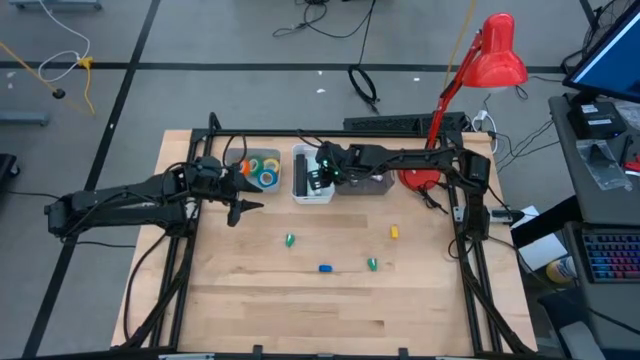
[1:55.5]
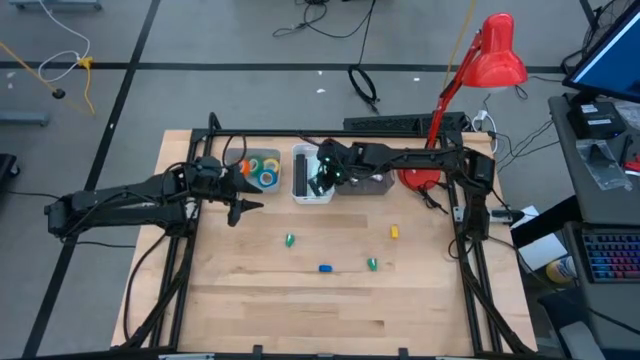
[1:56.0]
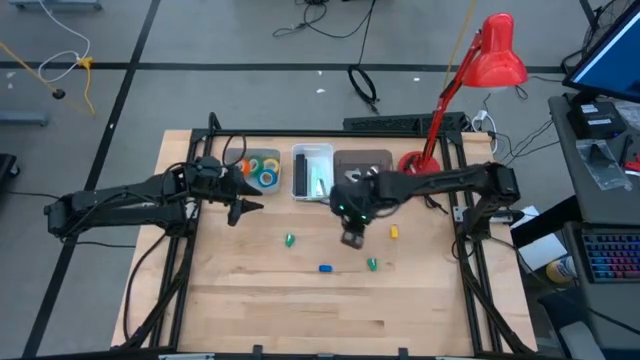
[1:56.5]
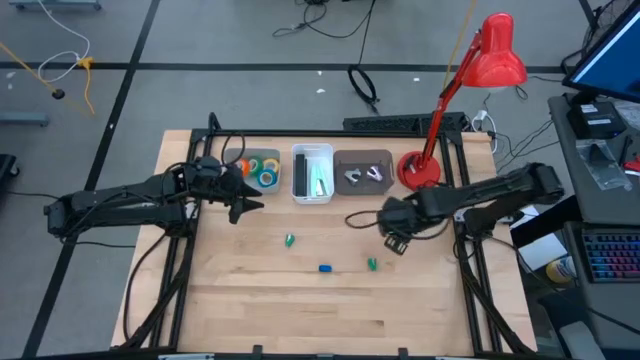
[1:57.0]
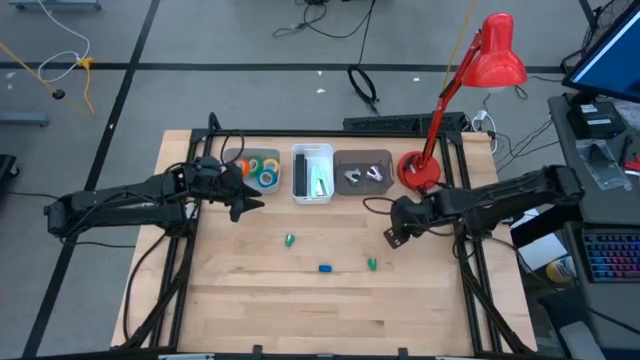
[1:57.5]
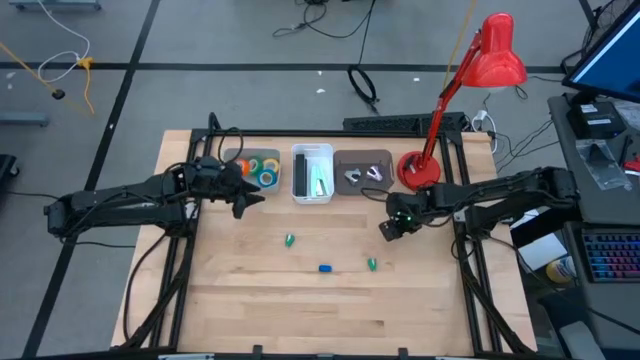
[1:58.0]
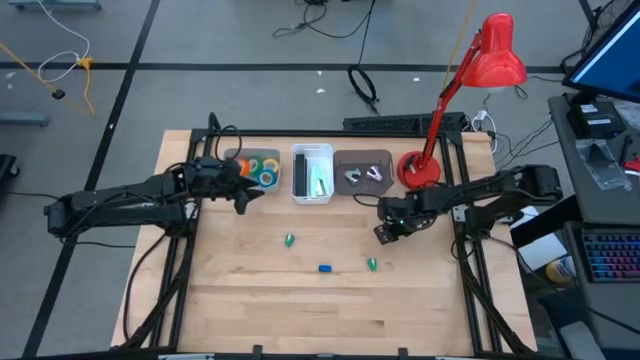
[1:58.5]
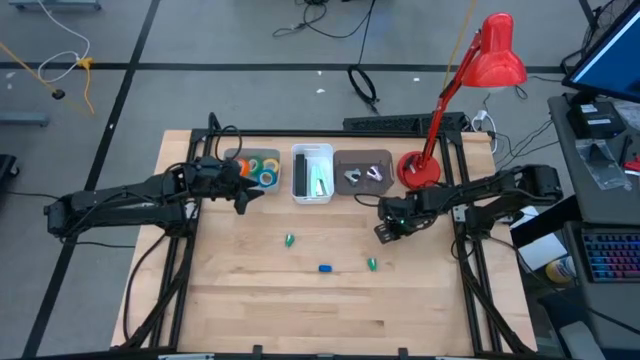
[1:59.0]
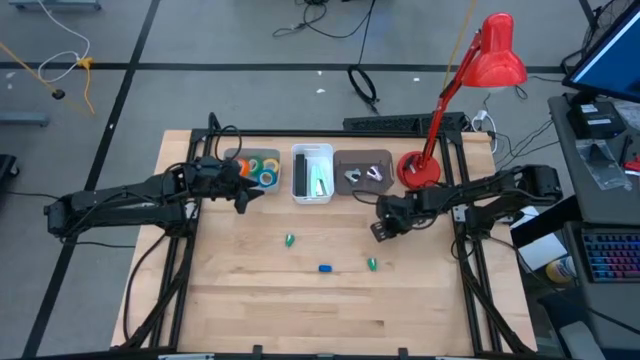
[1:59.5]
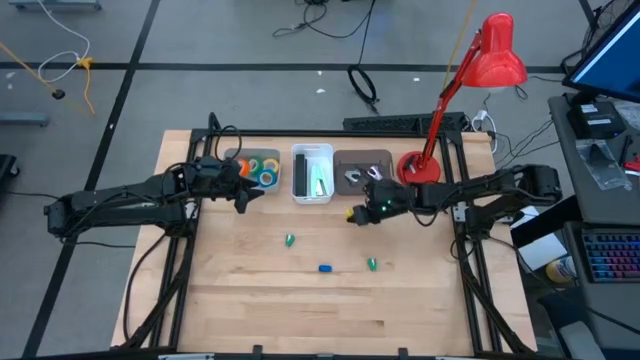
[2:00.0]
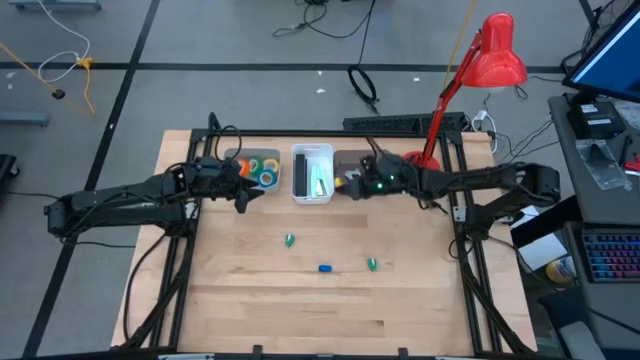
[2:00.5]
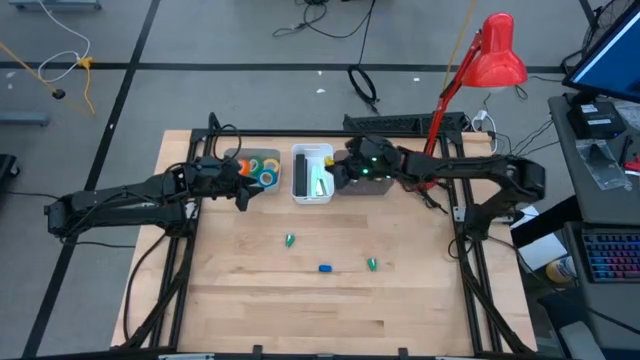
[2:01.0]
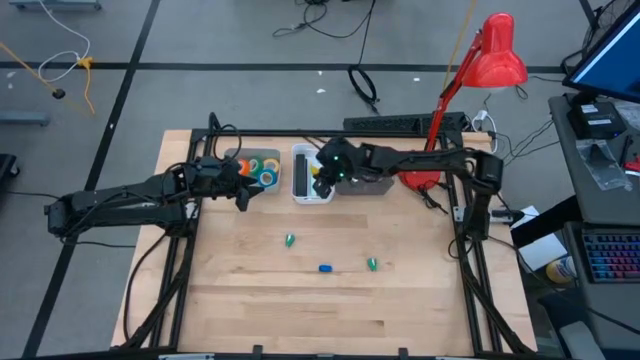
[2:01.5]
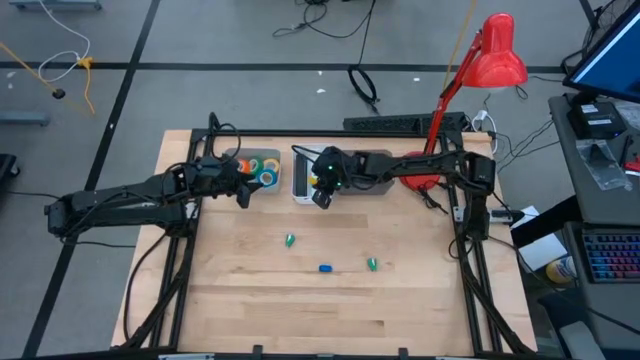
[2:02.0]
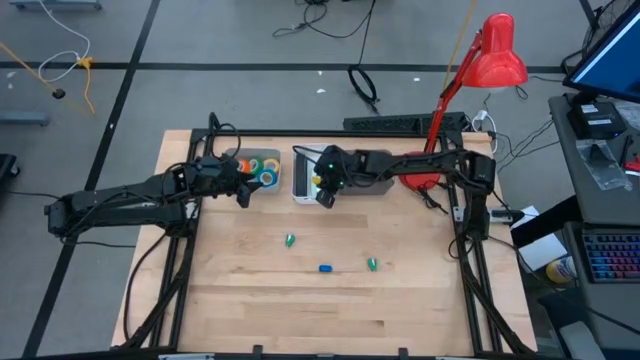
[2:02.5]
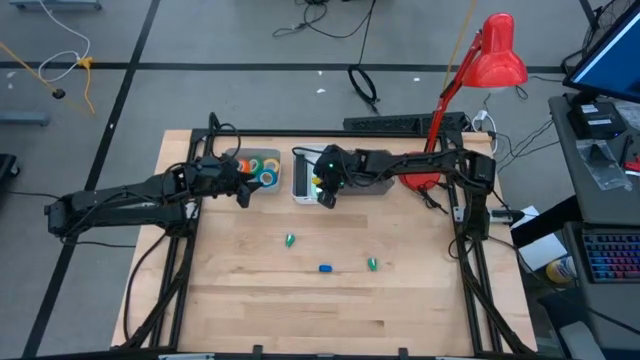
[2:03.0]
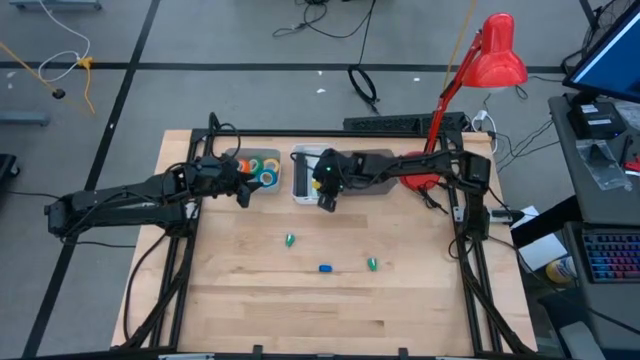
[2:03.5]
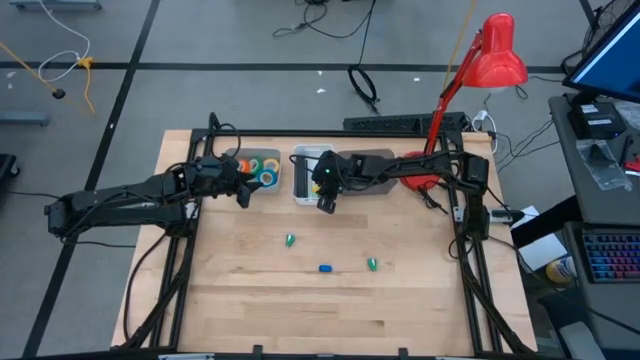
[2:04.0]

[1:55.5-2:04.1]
Task: Pick and place Stapler, Stapler remover, tape
Put the yellow stapler into the white bin

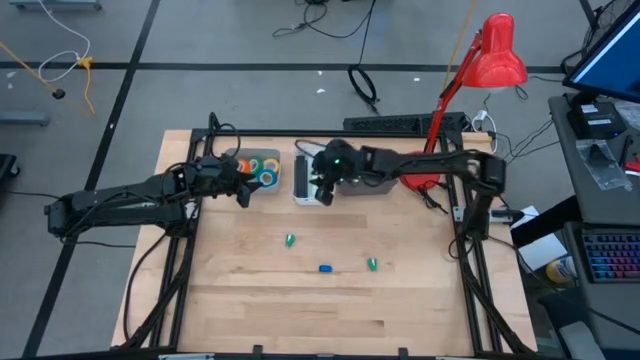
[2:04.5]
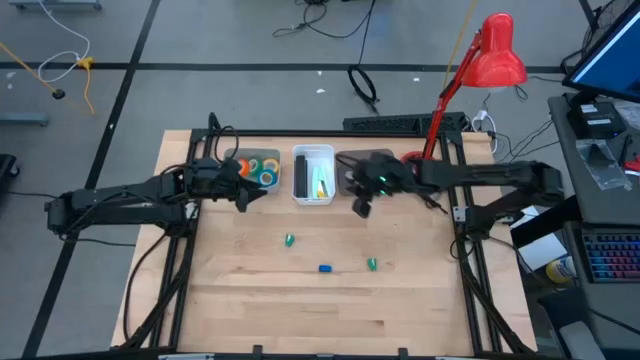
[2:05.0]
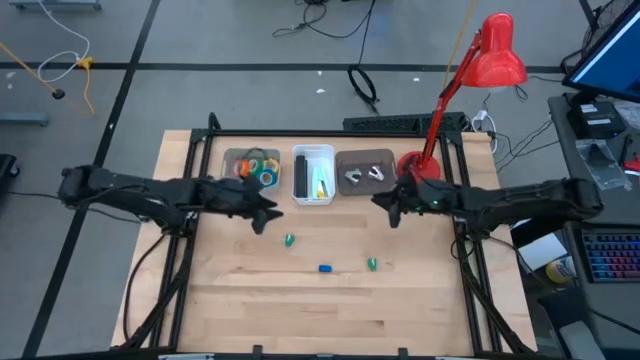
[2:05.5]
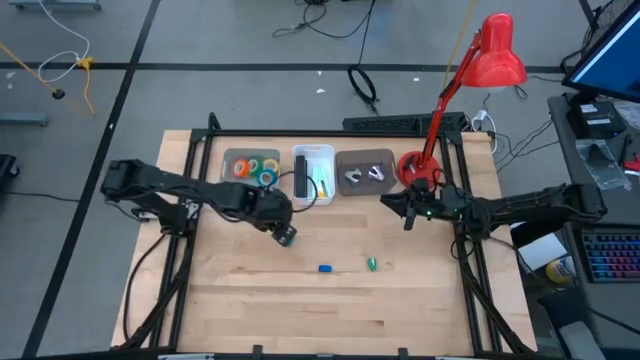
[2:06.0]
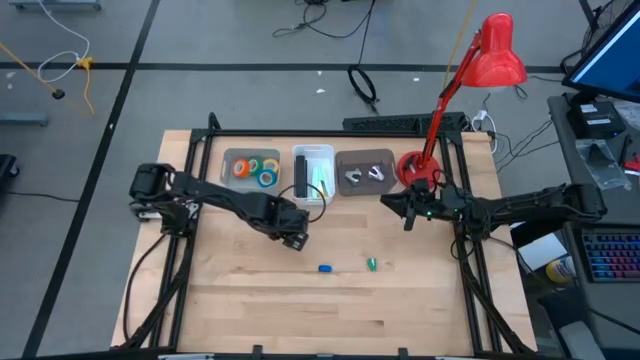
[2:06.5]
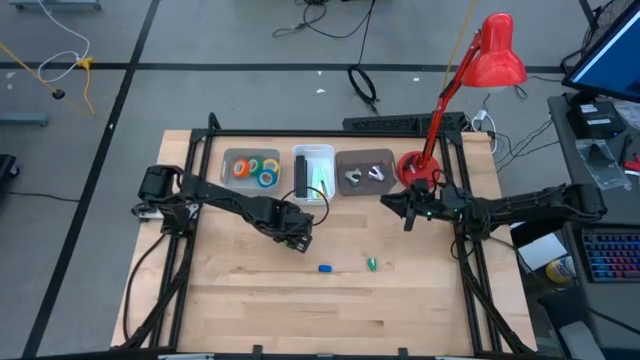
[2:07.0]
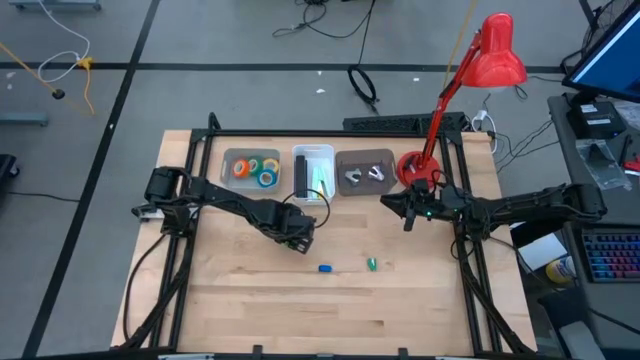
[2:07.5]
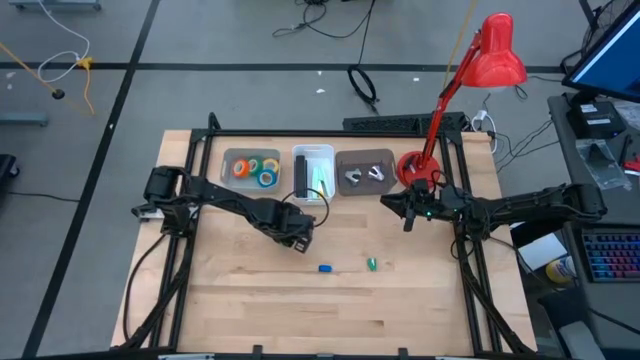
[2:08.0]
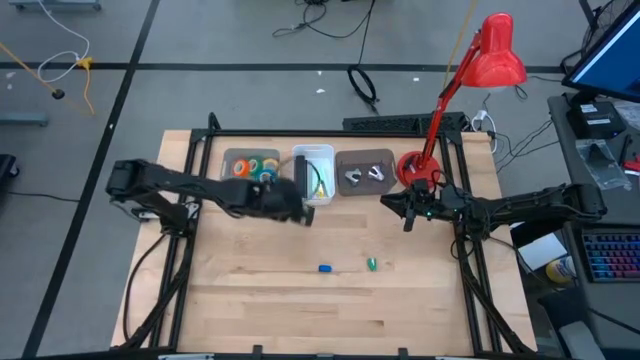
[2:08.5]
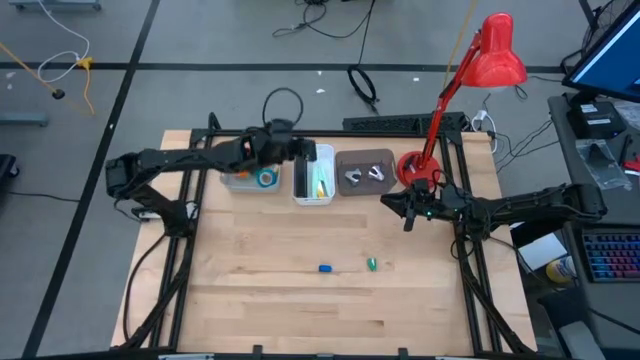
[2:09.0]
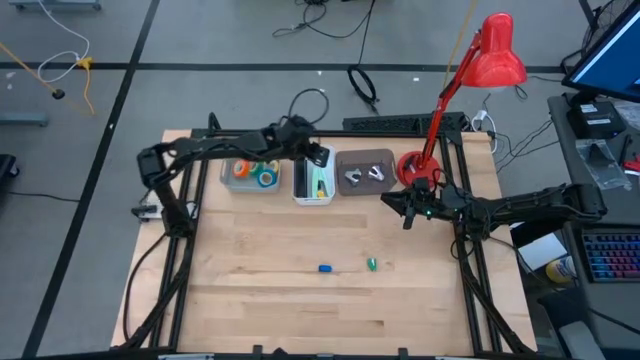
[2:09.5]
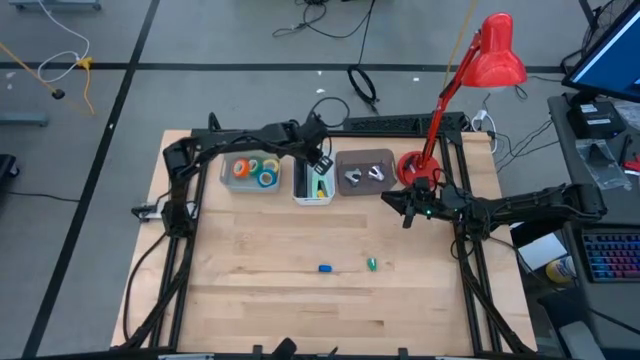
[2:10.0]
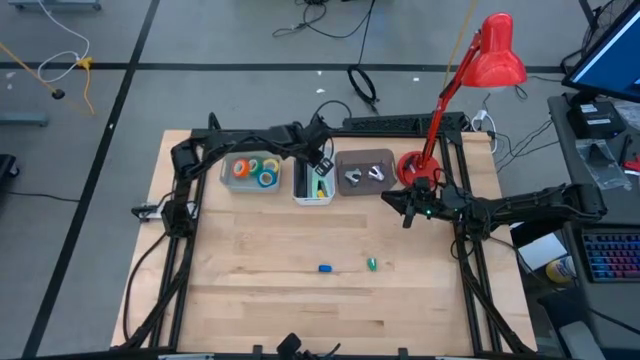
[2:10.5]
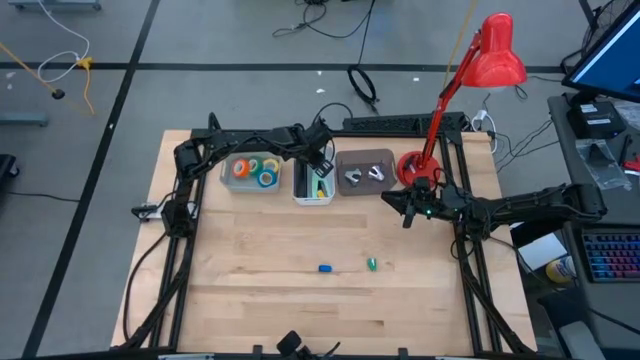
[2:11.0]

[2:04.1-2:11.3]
Put the left green stapler into the white bin

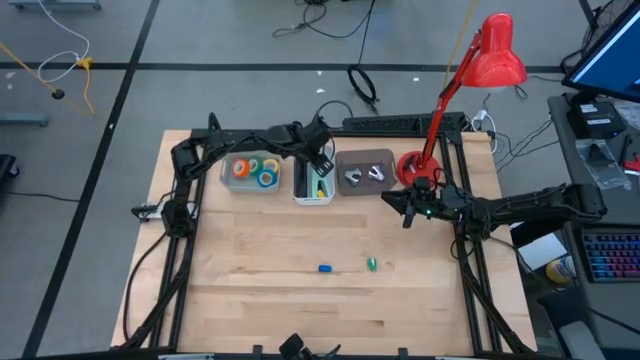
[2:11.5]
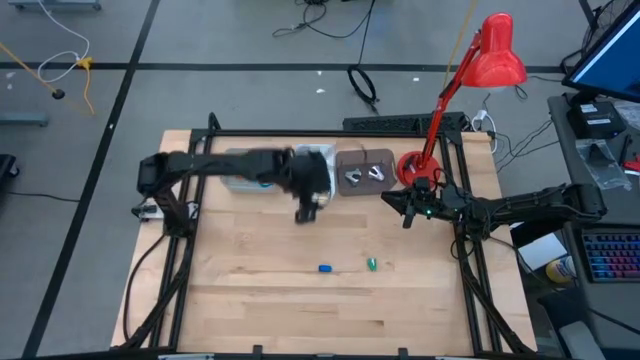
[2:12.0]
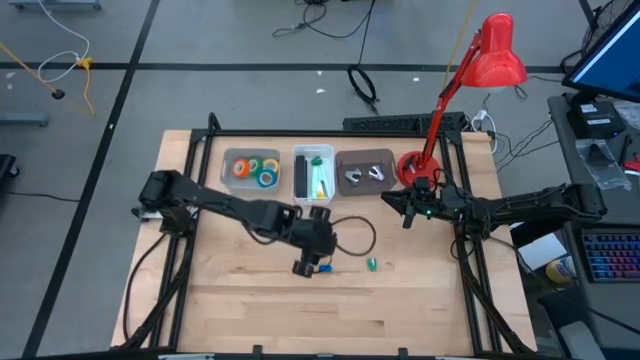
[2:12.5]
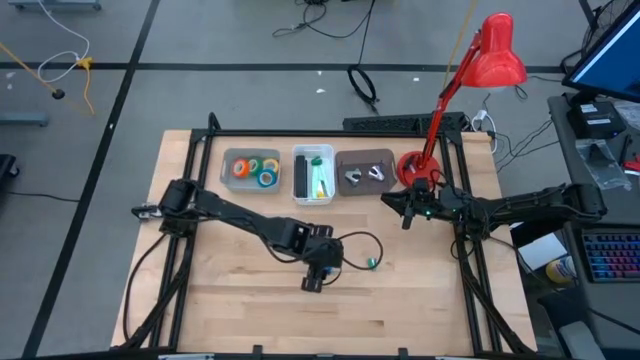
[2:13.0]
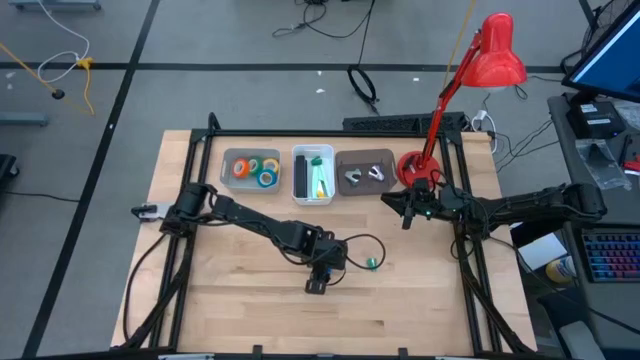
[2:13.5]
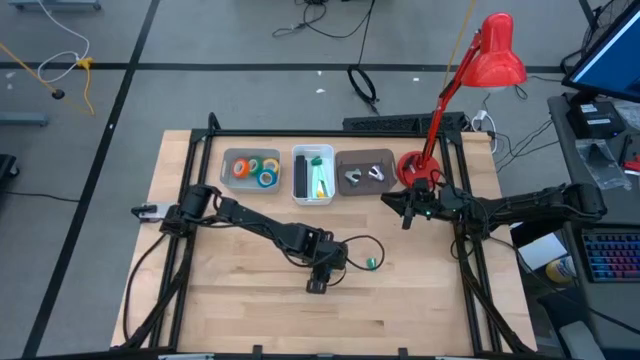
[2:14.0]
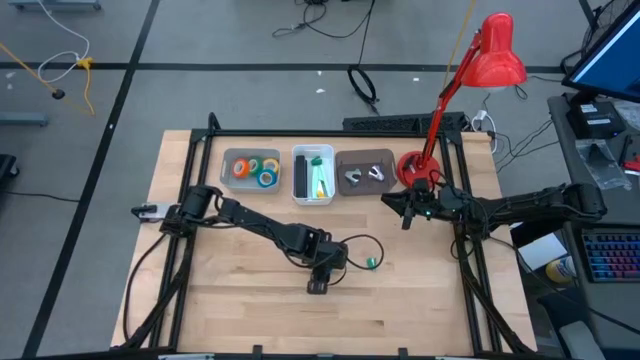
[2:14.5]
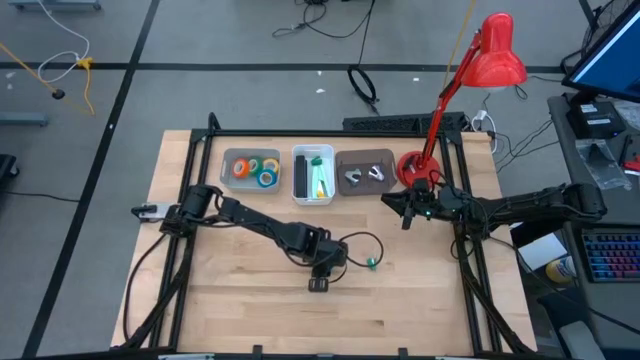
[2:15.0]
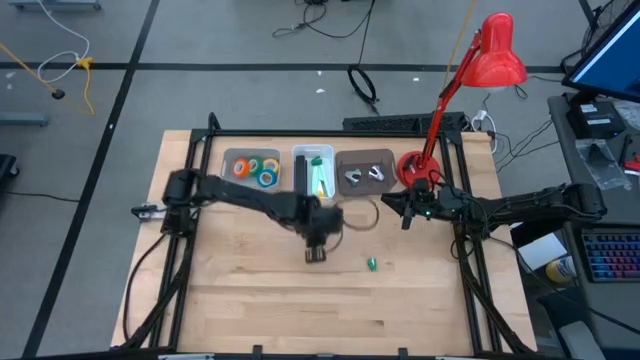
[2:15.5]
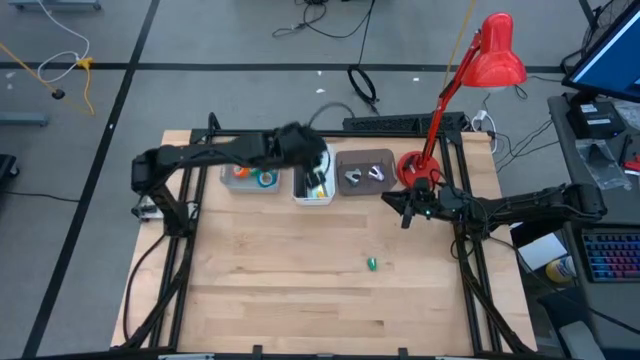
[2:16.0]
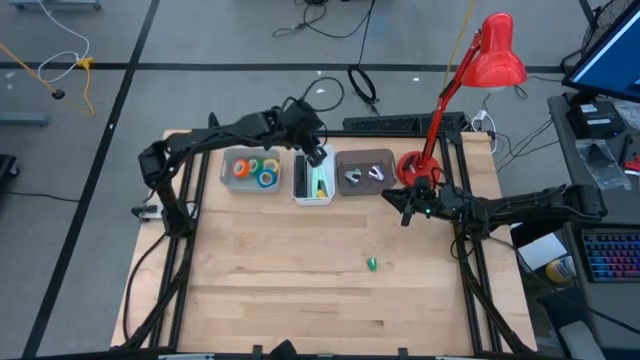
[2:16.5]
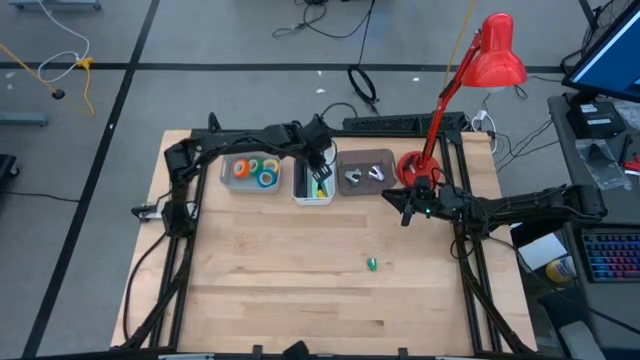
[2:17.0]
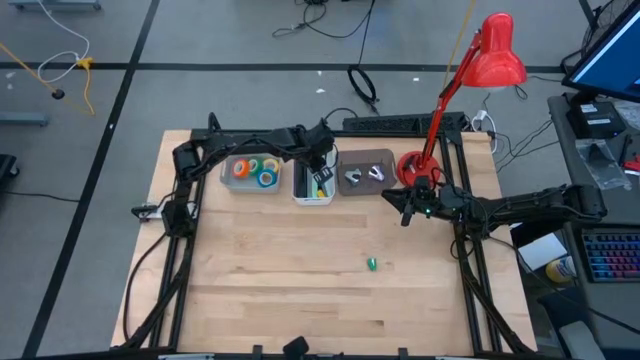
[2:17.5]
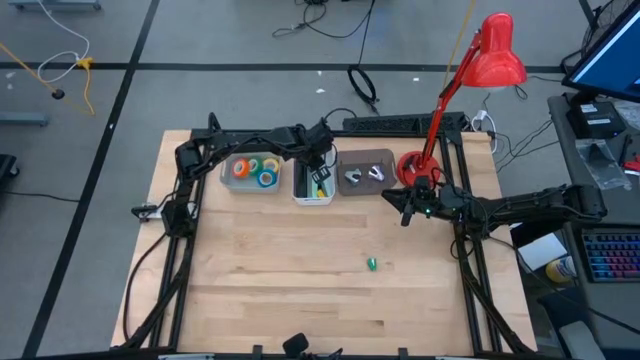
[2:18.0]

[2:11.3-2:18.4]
Put the blue stapler into the white bin
